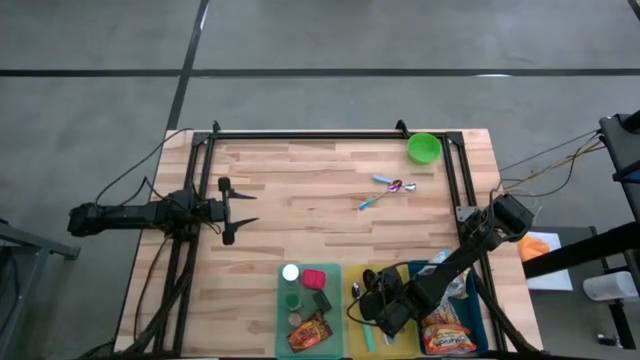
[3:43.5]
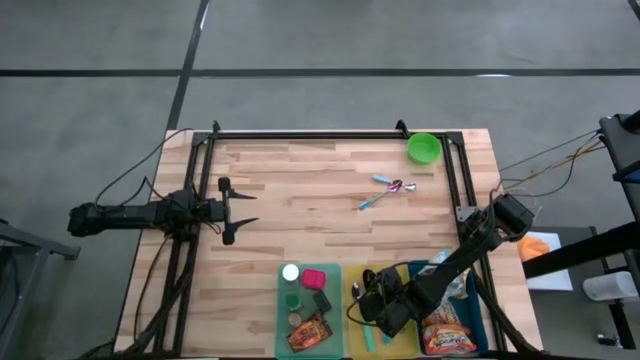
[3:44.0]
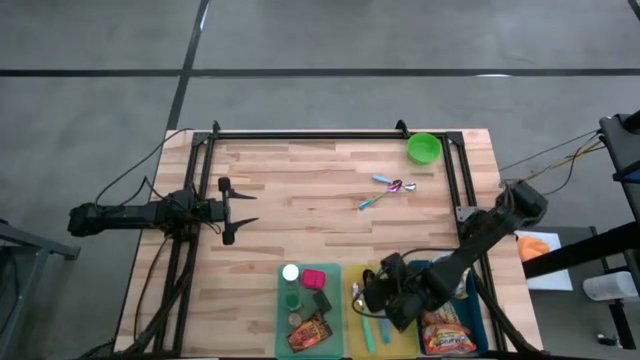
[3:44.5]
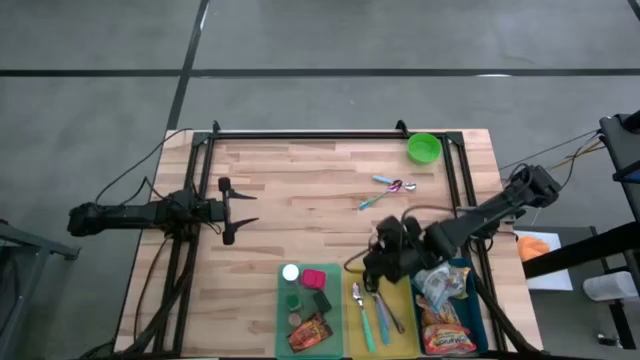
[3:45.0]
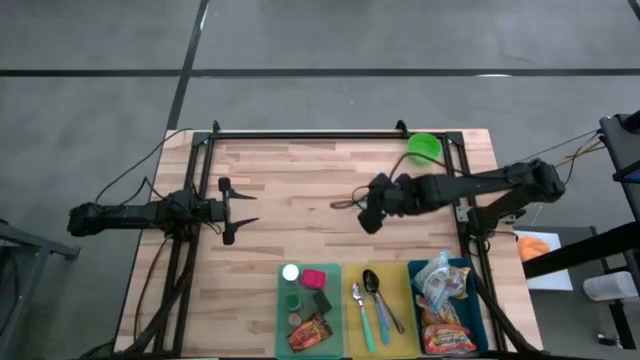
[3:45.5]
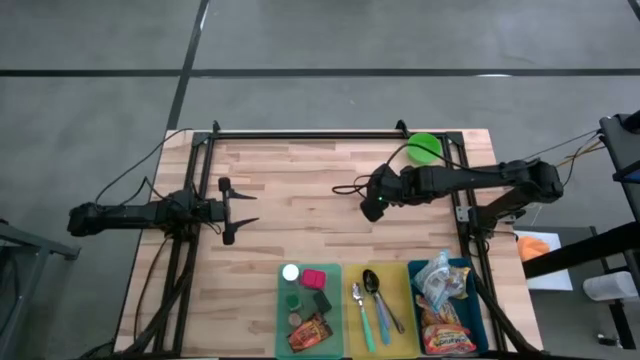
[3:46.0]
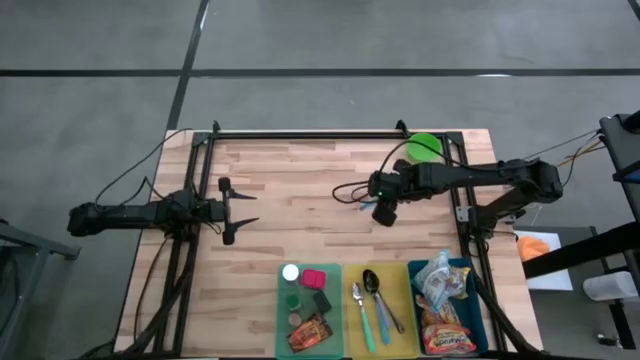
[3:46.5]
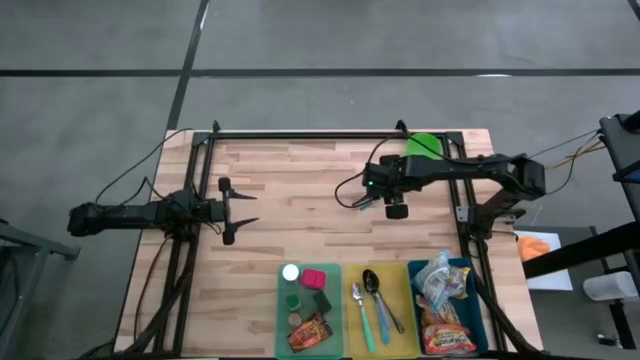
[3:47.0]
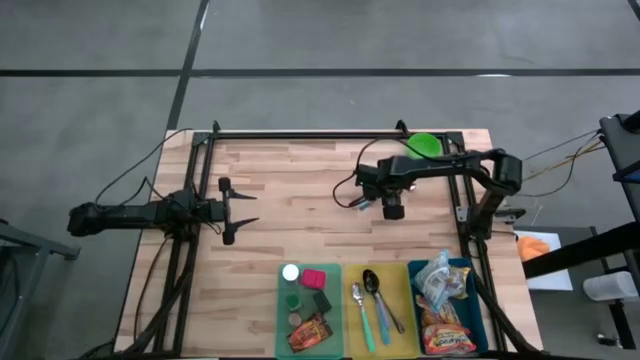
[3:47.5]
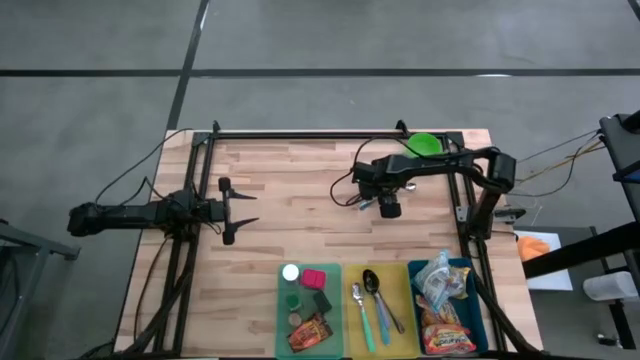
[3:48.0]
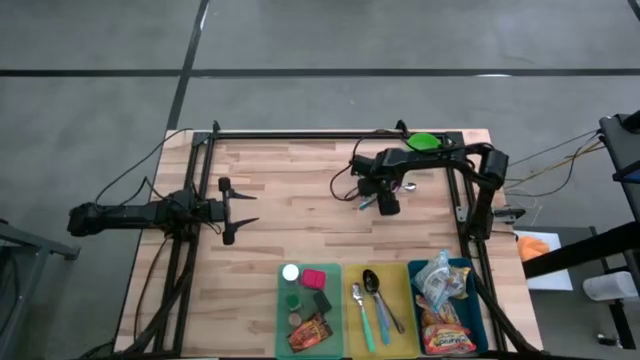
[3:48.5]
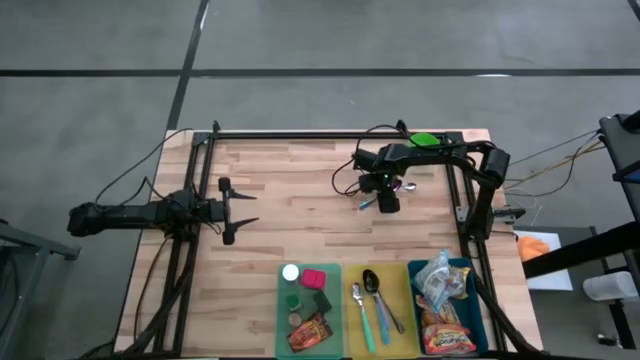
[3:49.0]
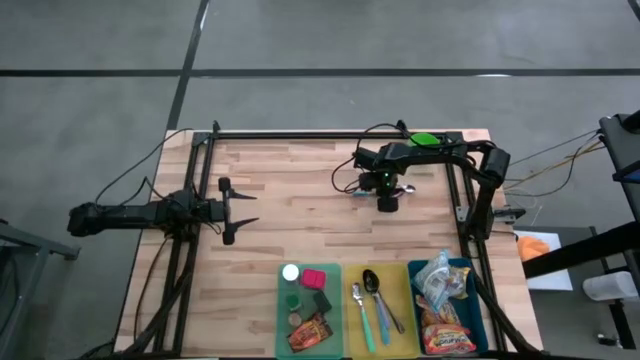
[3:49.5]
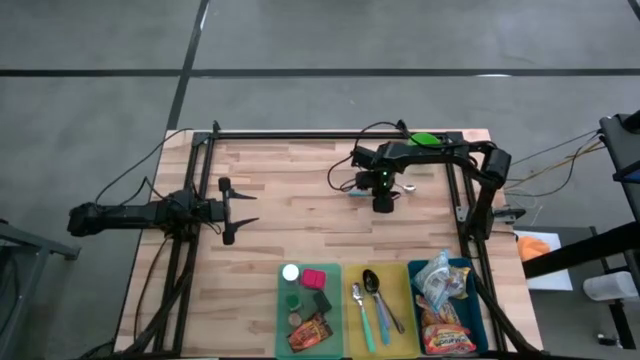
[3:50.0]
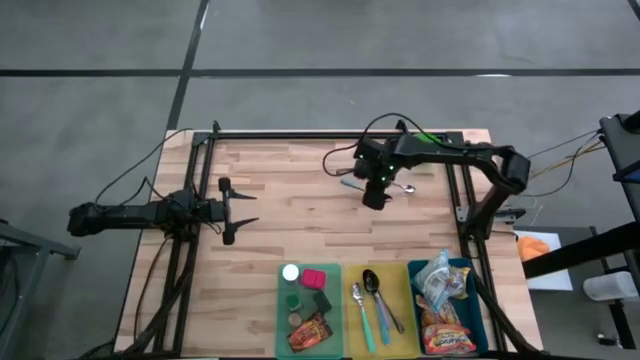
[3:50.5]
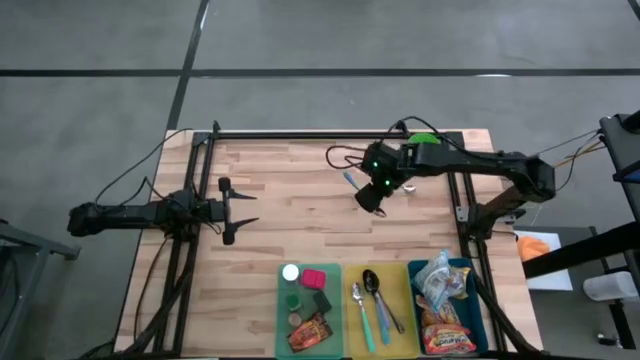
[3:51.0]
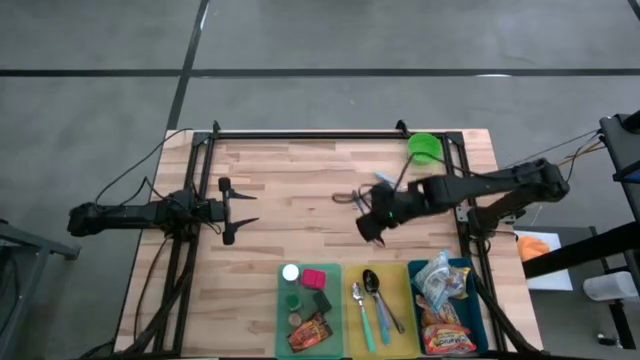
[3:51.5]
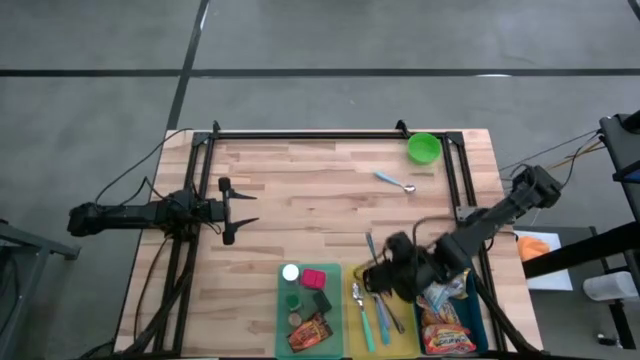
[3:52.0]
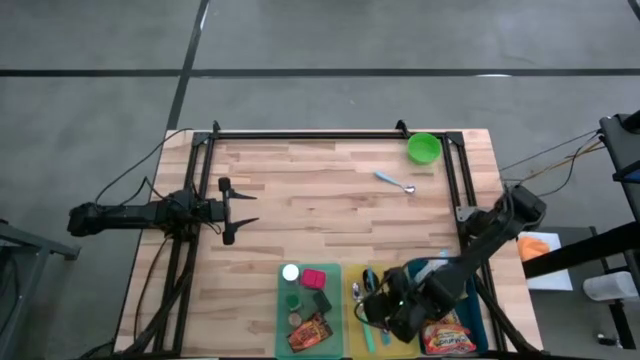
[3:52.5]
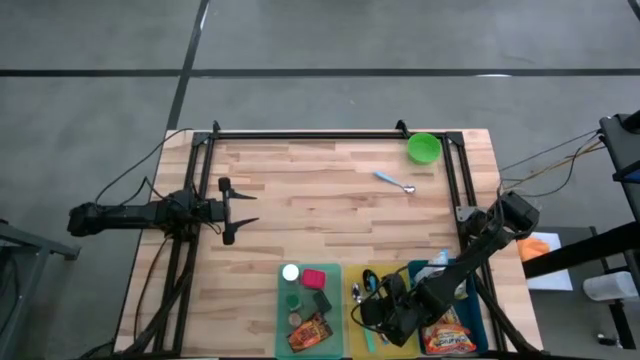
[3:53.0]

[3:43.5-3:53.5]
Put the purple spoon into the yellow bin
